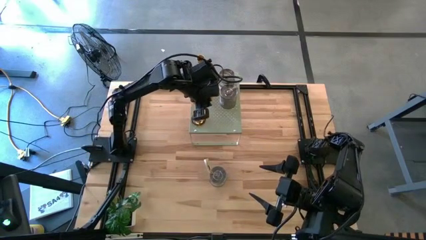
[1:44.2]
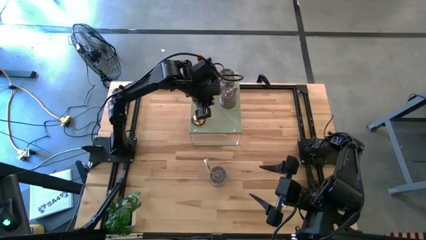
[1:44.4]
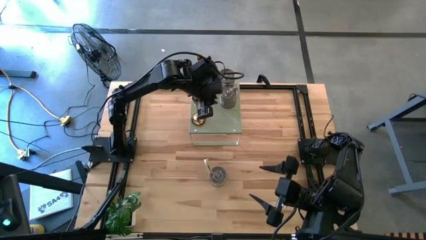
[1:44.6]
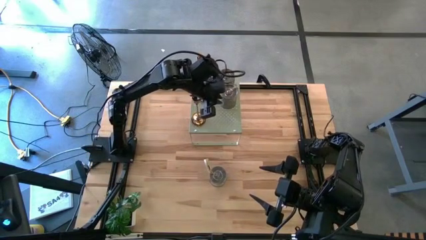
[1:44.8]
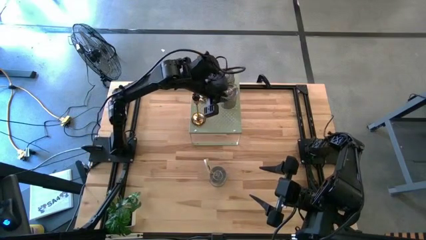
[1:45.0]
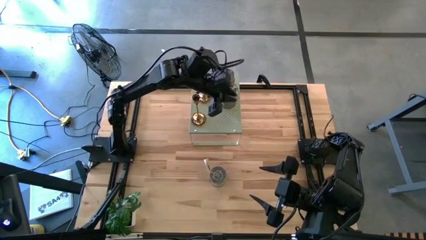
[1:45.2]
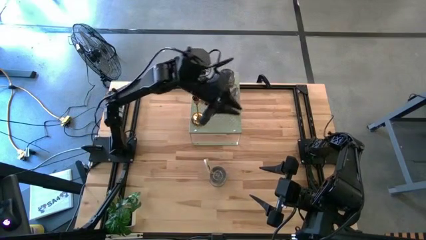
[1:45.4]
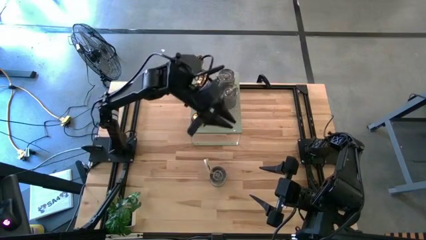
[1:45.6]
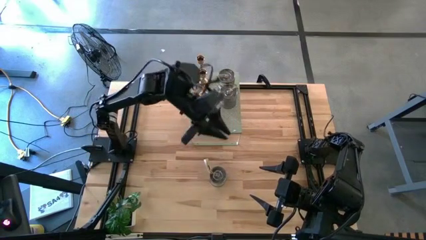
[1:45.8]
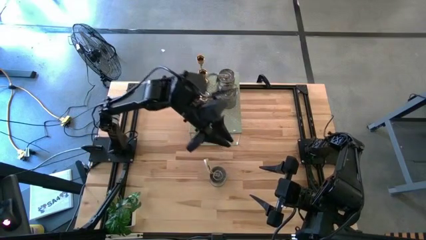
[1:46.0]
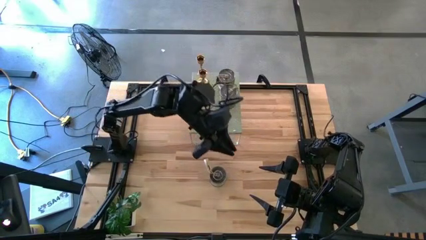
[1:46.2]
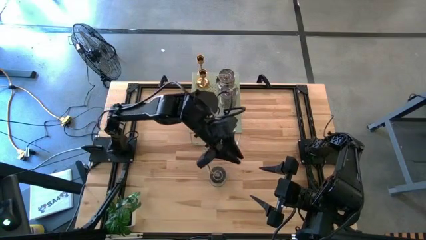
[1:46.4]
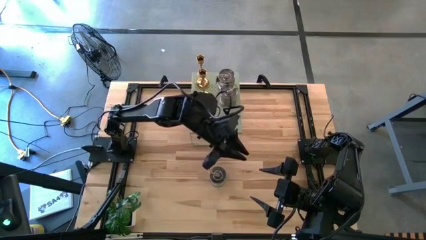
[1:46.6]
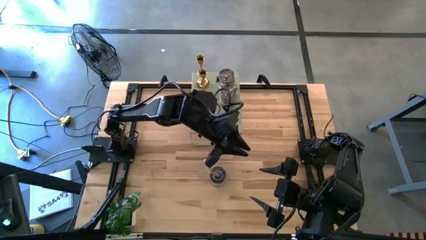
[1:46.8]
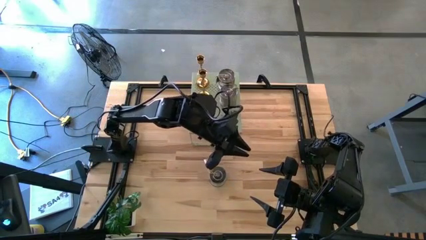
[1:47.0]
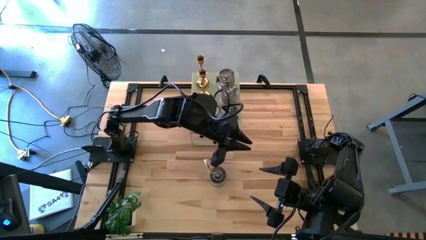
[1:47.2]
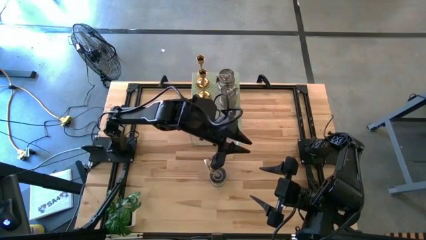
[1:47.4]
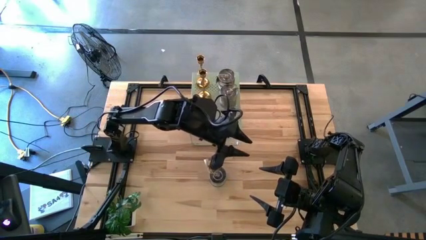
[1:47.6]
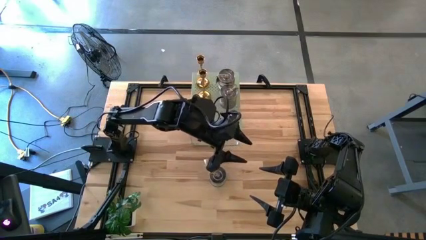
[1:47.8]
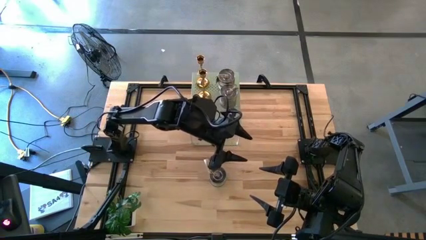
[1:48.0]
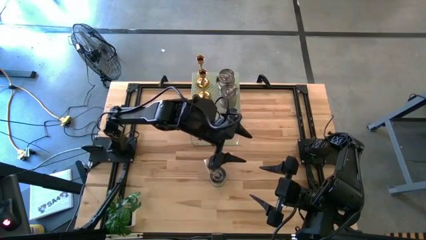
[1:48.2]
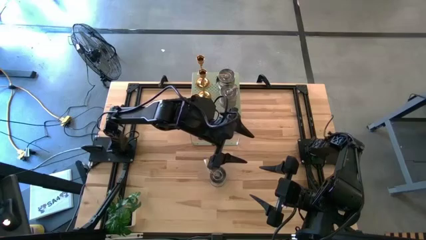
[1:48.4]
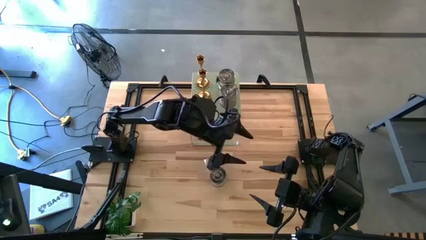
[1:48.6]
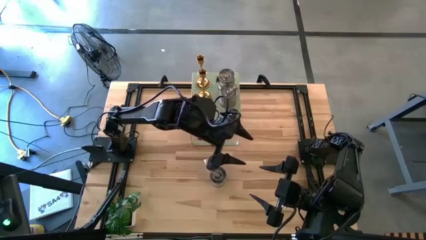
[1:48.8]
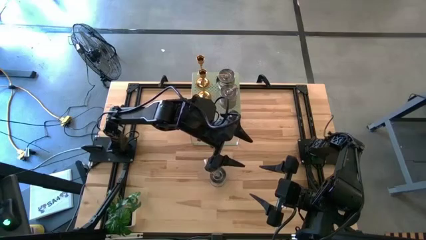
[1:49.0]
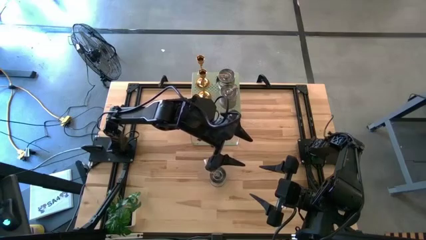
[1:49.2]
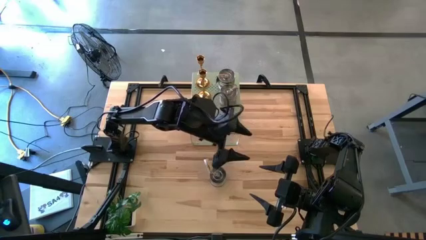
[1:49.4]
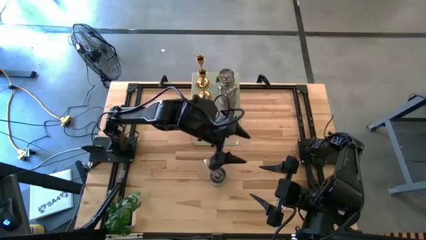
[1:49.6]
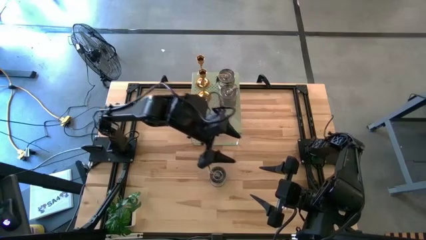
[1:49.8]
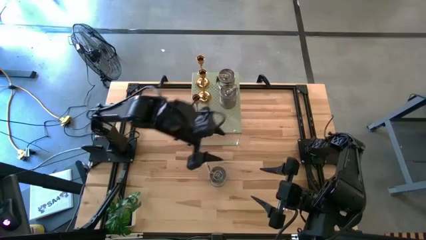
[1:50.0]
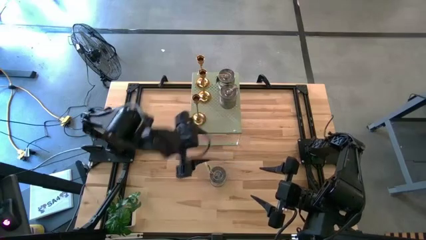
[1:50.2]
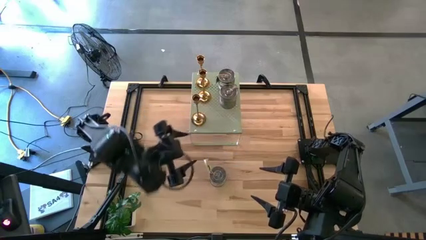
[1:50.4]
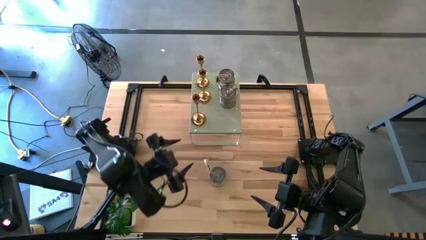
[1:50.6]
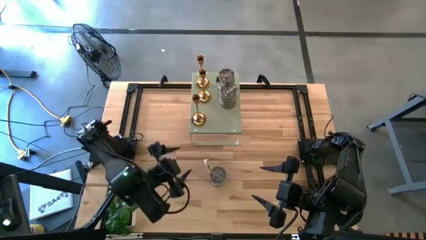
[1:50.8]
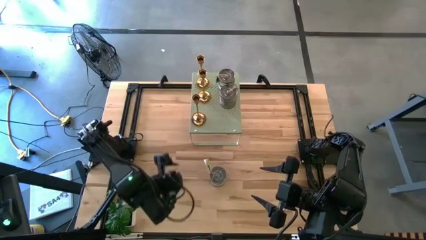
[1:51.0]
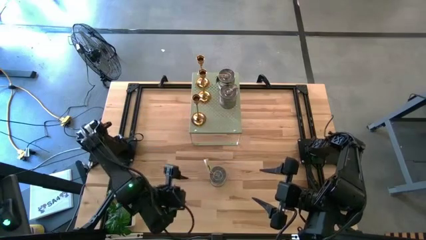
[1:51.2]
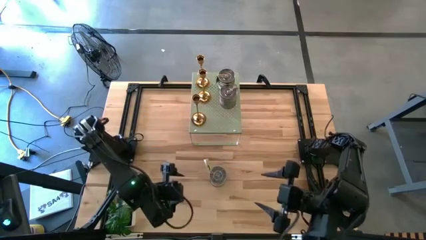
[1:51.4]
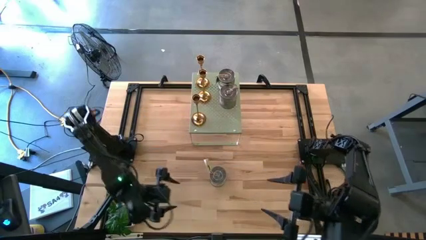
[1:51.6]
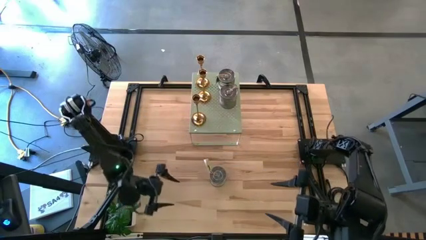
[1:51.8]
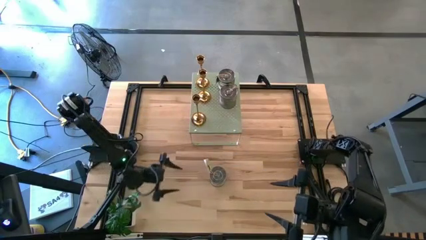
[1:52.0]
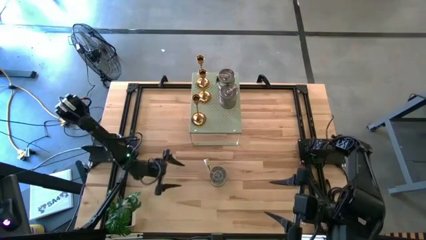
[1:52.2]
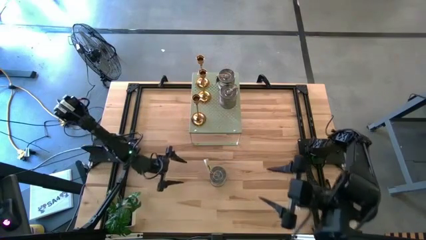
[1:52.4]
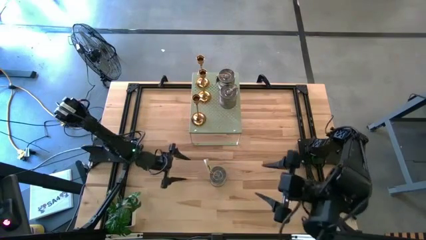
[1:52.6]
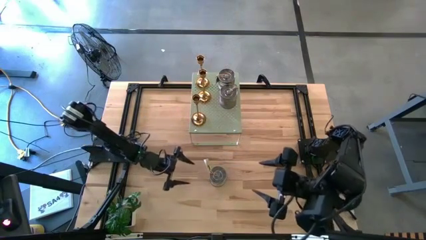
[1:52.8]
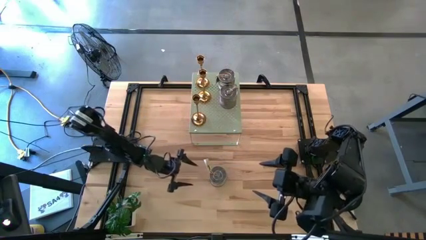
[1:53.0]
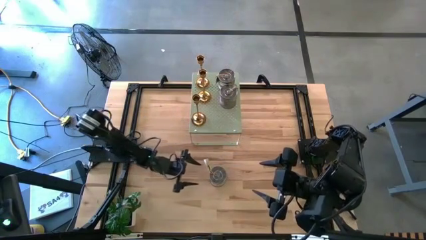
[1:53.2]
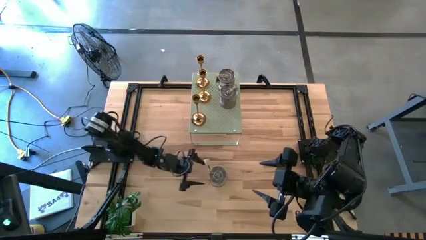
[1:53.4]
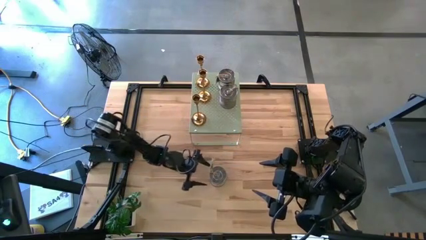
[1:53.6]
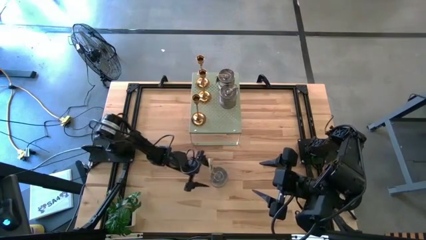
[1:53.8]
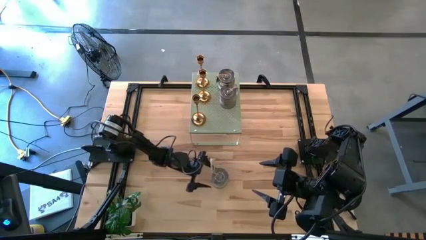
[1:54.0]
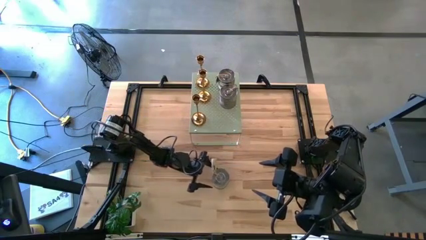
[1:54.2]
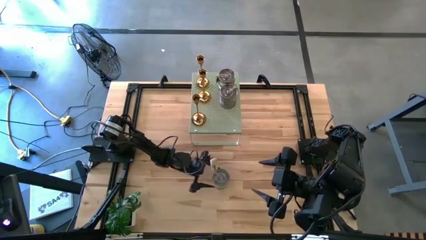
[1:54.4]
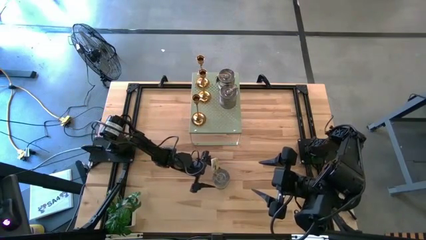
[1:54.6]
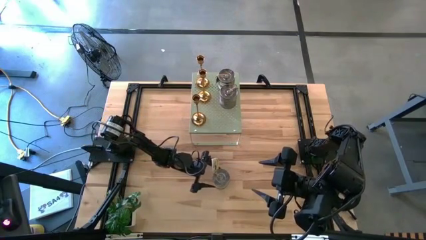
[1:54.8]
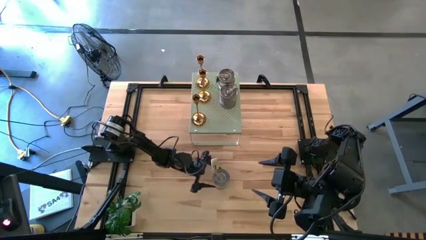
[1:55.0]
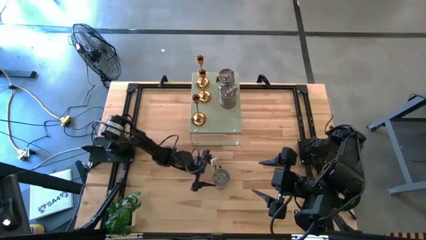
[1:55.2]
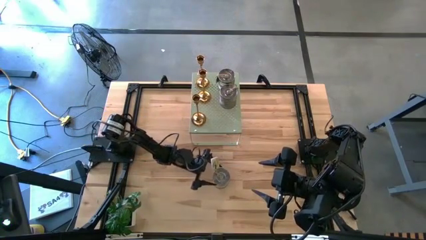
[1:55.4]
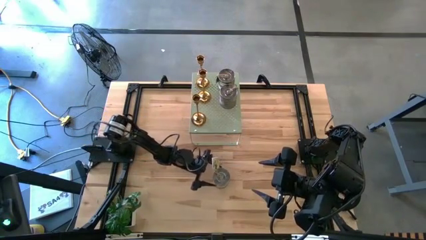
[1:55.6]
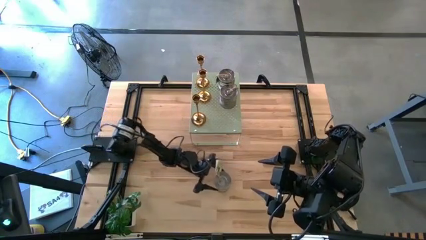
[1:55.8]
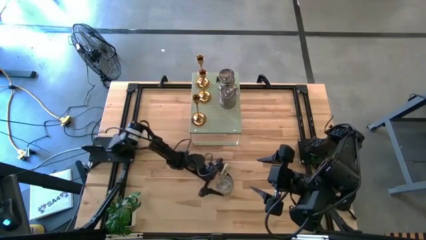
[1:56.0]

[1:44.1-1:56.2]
Task: Pick & Place candle stick holders
Put the green scented candle on the shelf aligned with the other brown scented candle

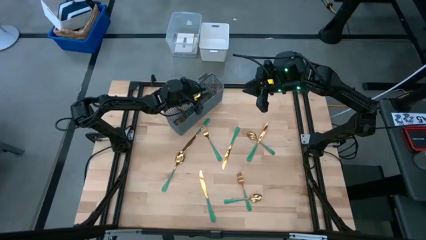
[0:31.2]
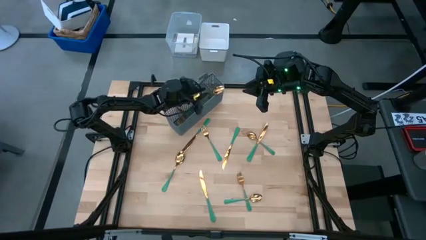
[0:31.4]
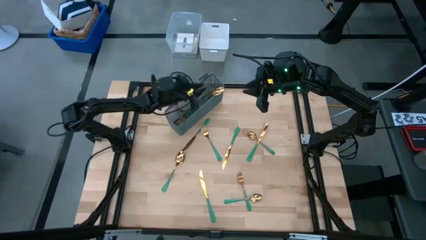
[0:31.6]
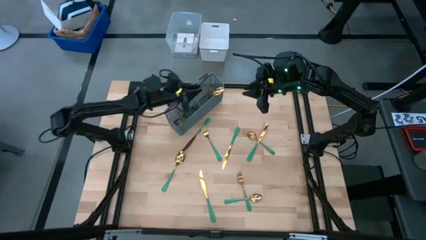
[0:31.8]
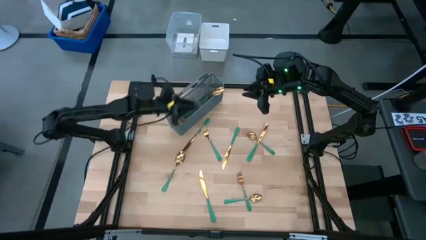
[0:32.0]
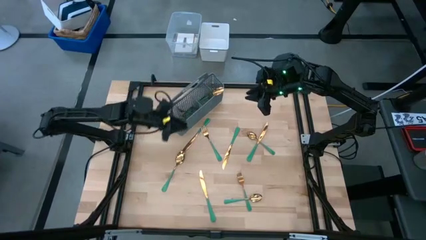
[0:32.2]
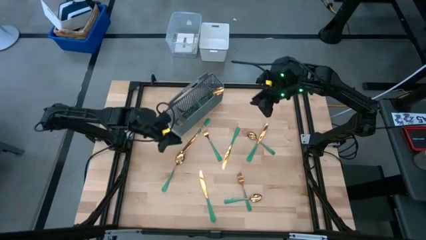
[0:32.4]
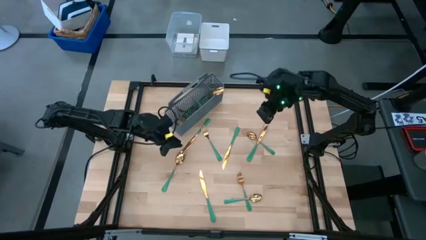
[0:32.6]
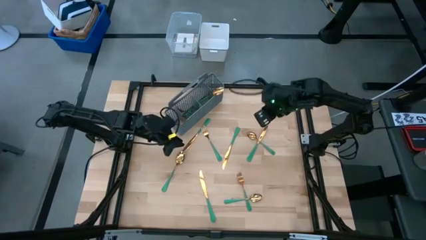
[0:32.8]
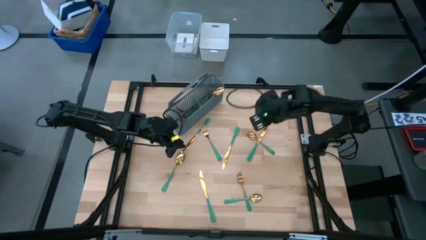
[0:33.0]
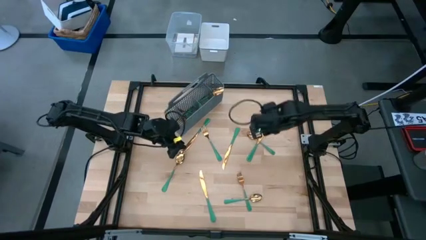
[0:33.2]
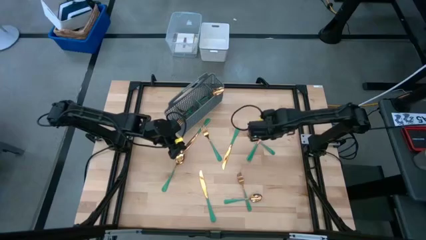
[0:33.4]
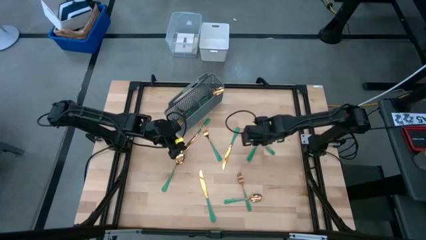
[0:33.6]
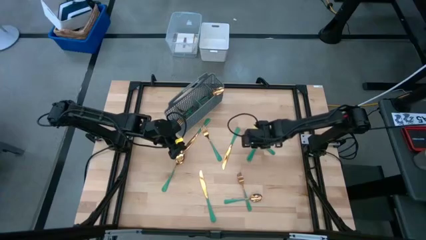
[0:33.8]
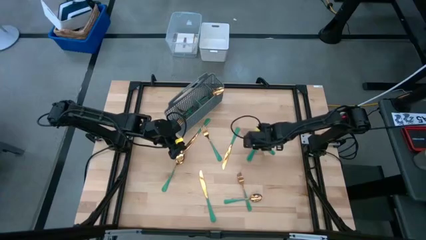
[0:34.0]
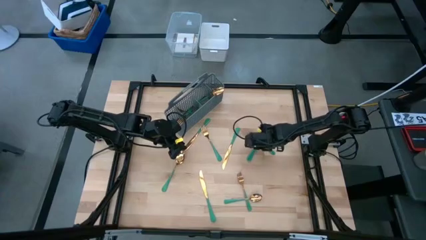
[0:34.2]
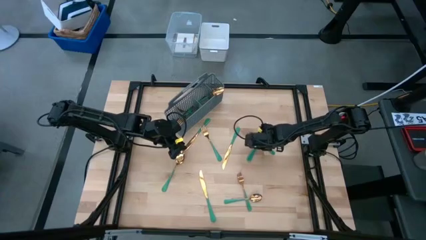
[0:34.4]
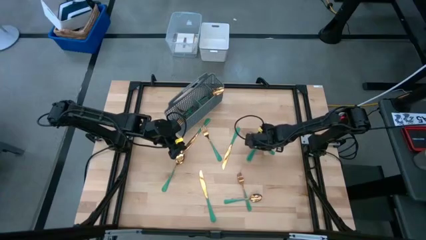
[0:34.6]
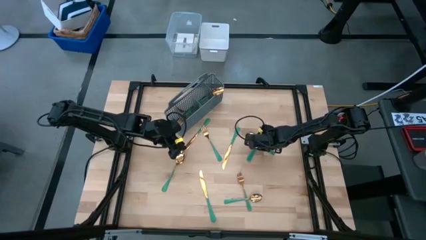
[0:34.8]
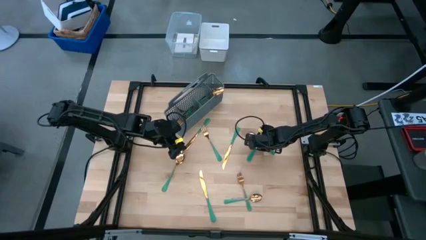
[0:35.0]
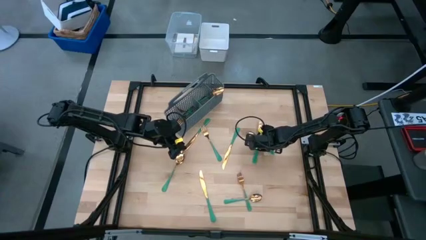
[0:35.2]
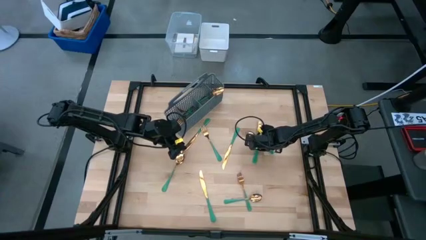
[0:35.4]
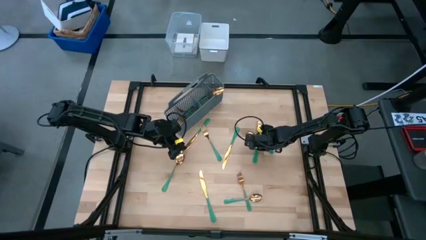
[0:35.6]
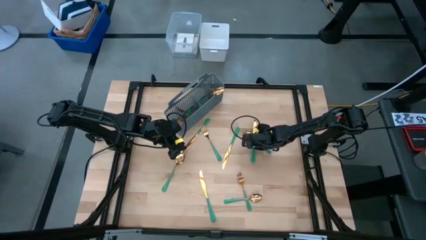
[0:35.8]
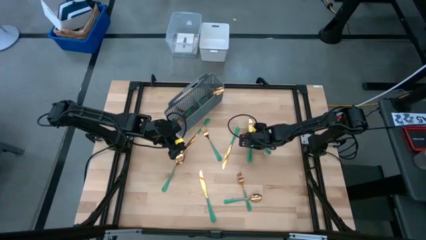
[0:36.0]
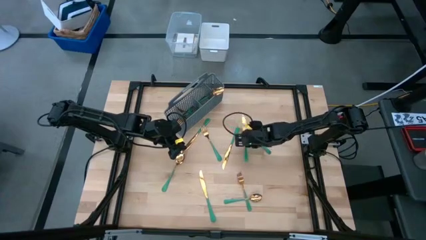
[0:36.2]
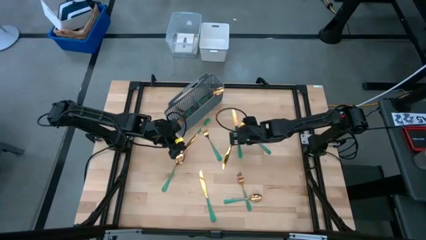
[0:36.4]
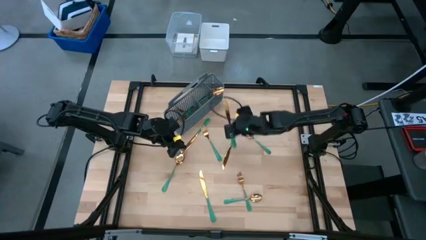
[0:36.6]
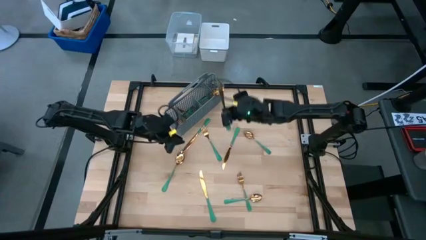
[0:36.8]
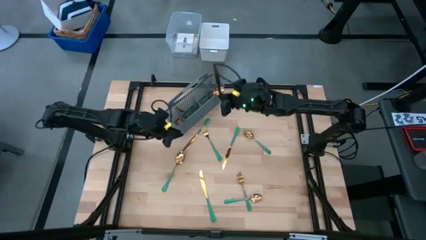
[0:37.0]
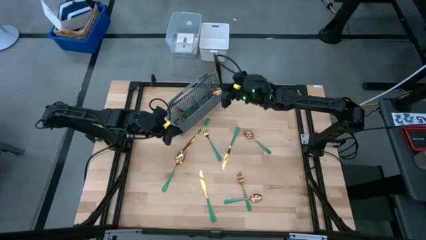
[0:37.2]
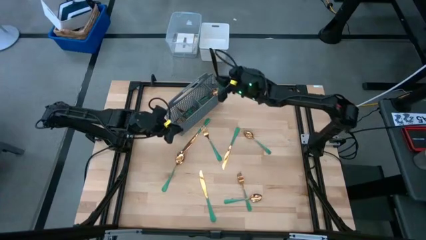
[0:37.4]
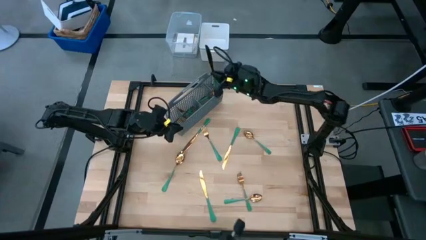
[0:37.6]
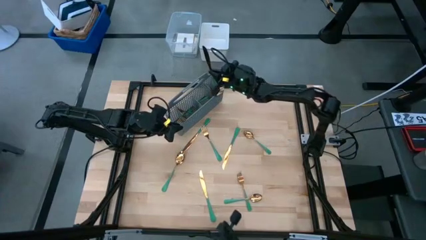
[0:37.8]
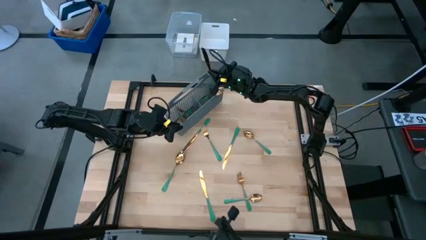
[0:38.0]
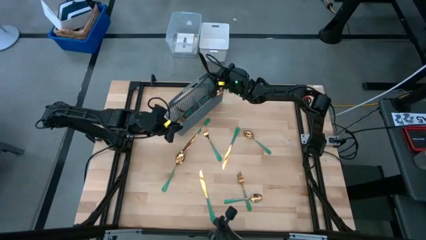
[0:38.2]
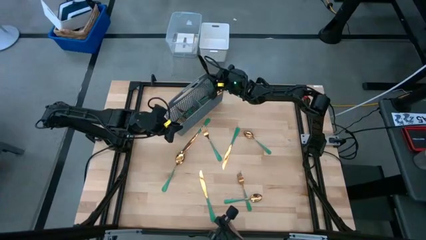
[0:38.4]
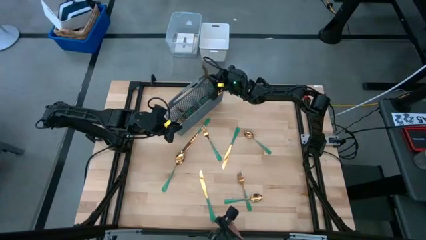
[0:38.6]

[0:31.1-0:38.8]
Task: Sort silverware
Put the top right green-gold table knife into the silverware basket
